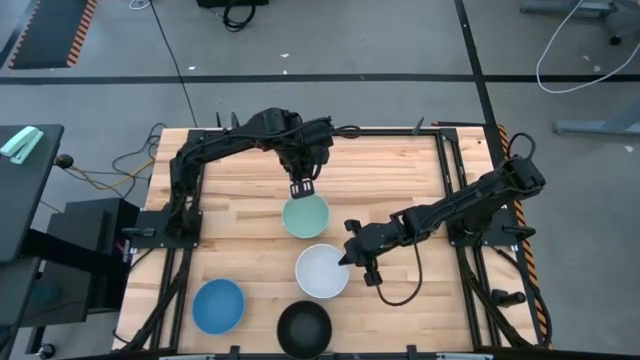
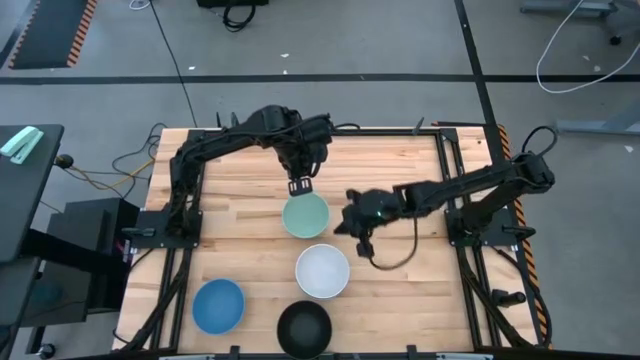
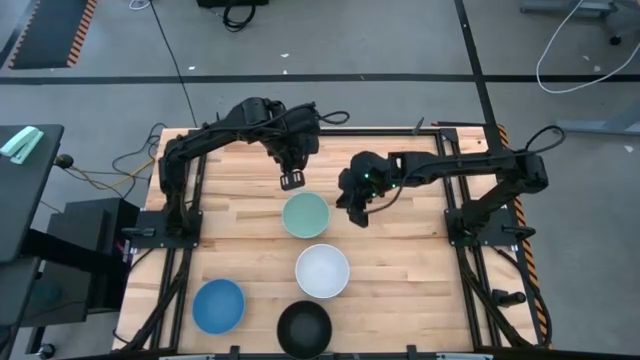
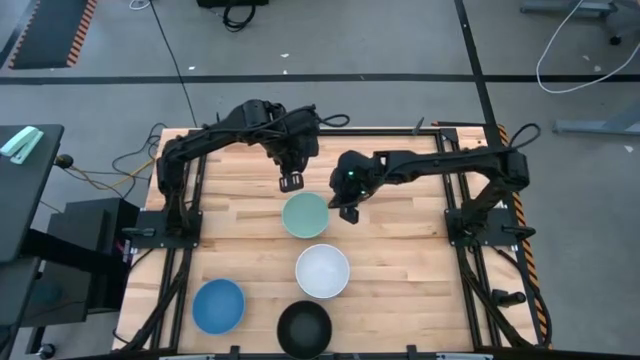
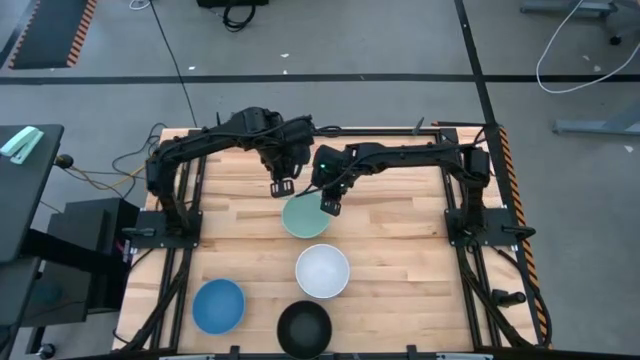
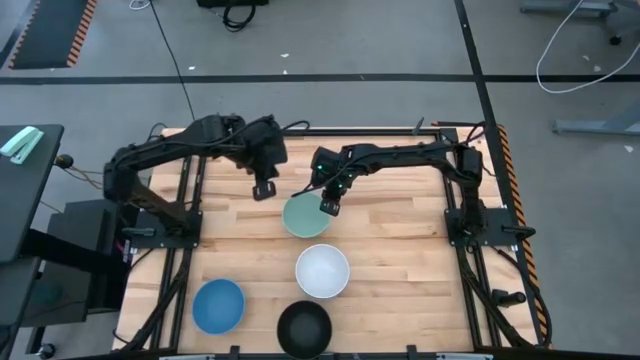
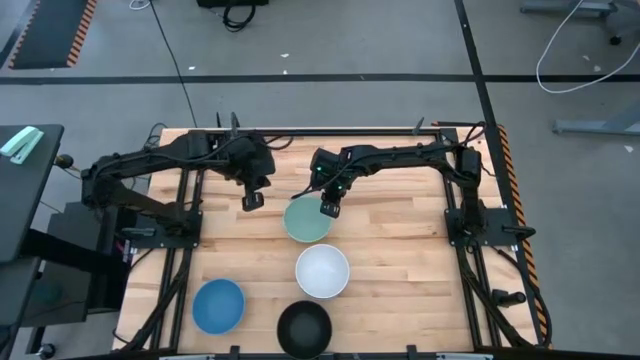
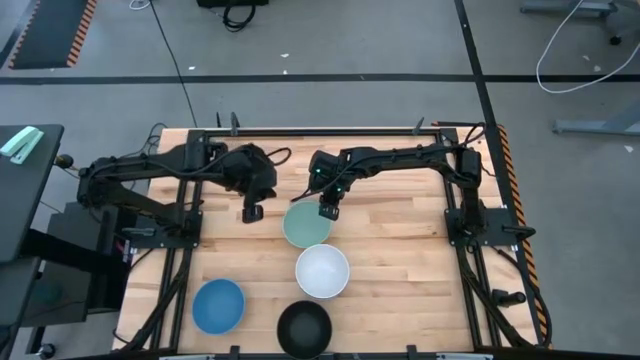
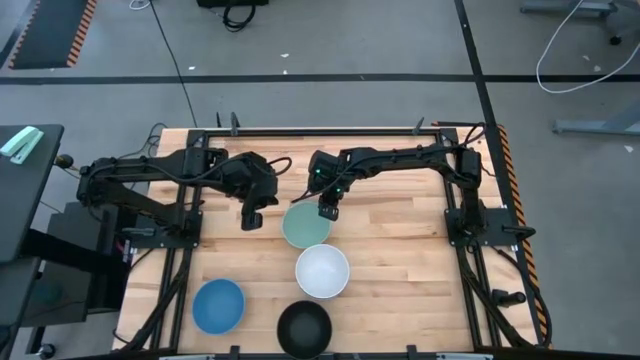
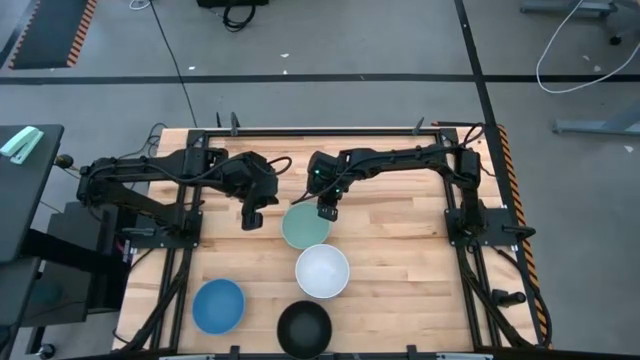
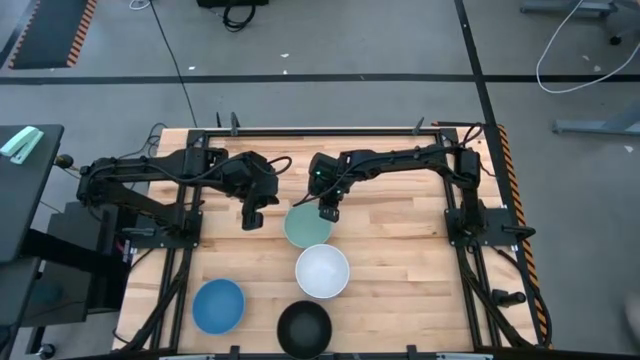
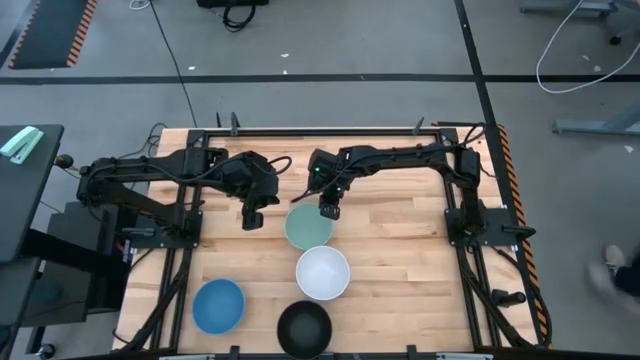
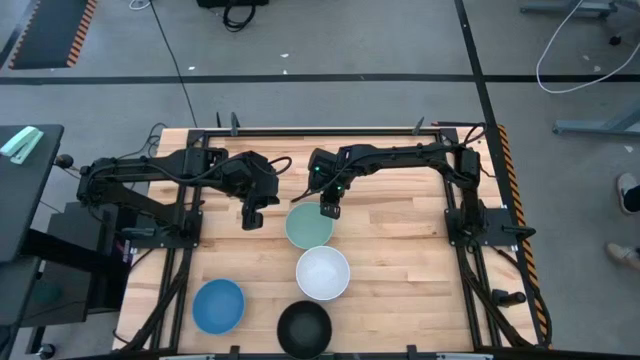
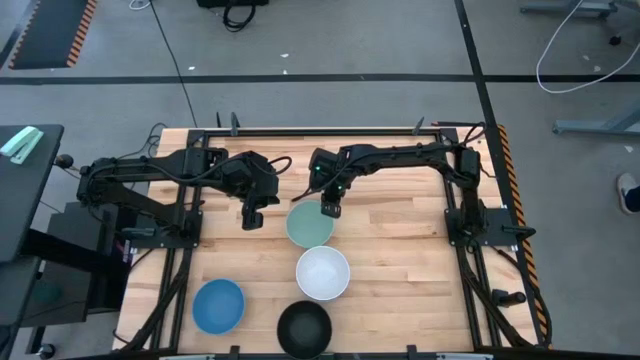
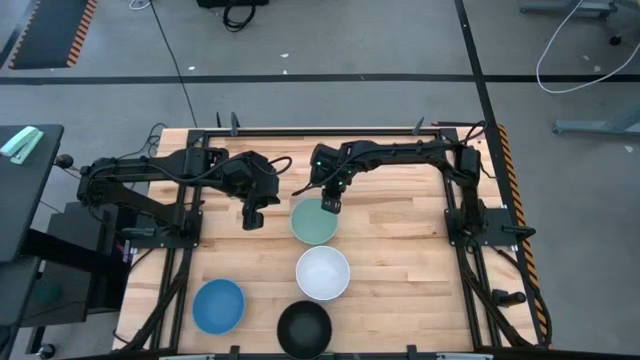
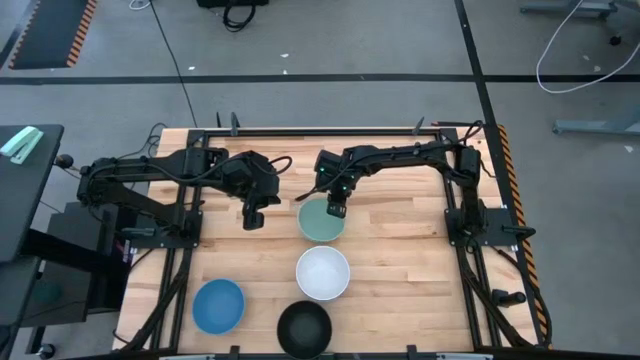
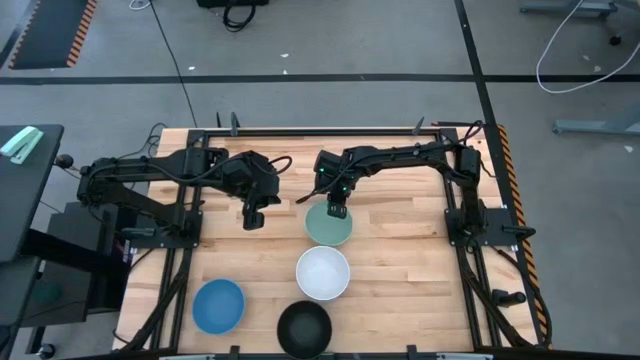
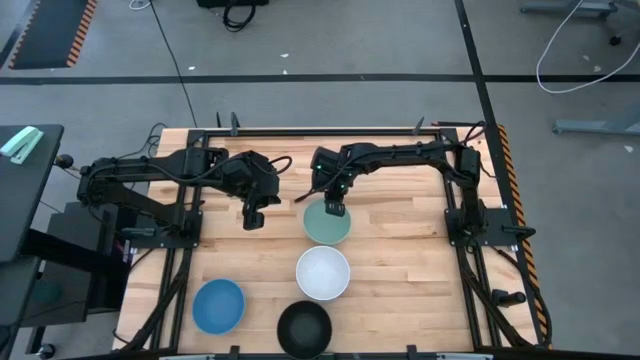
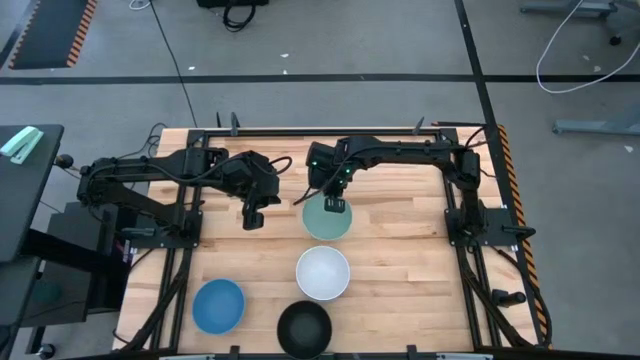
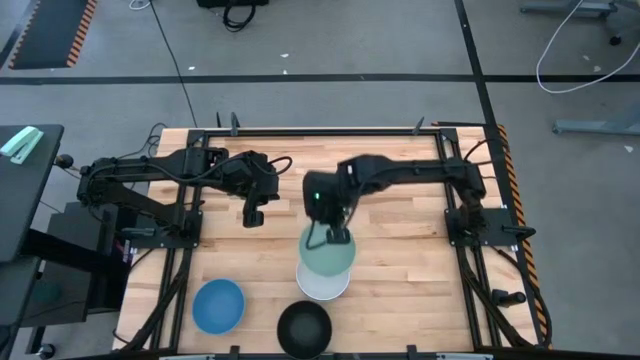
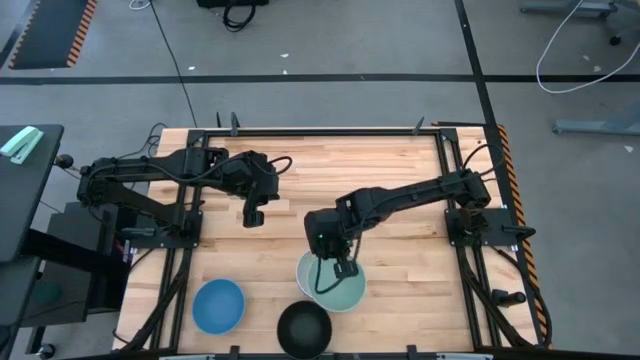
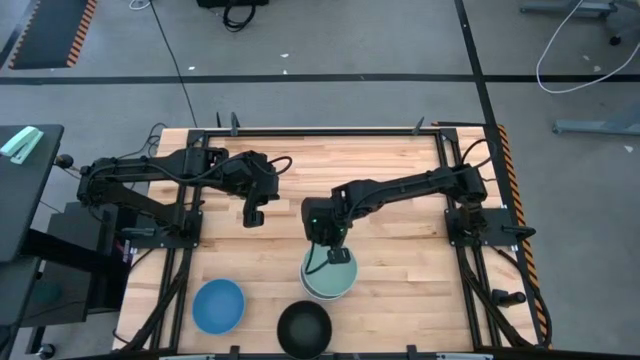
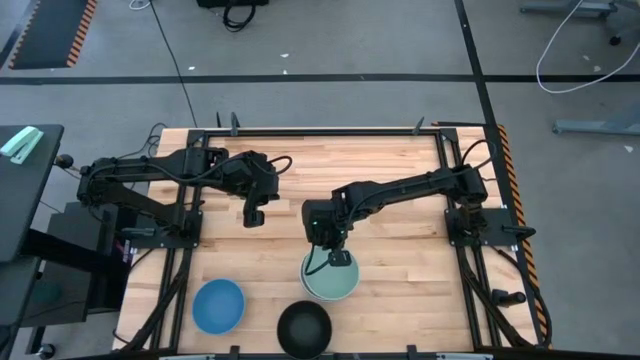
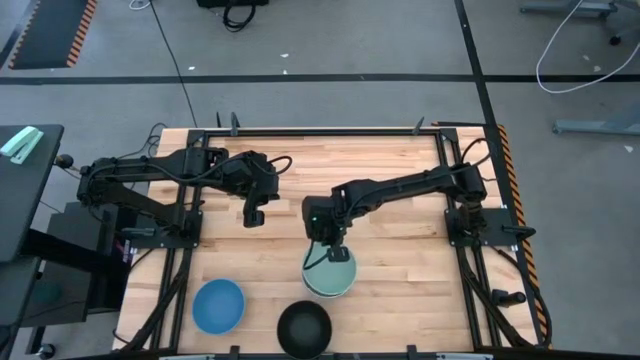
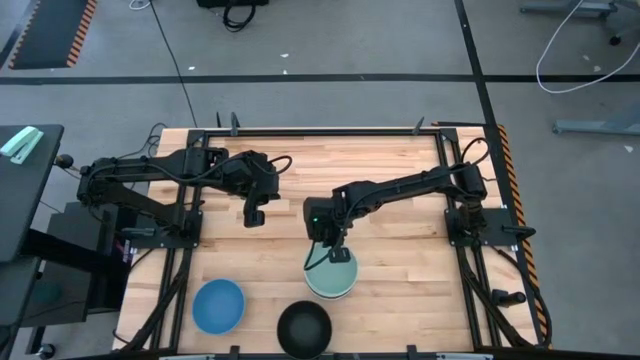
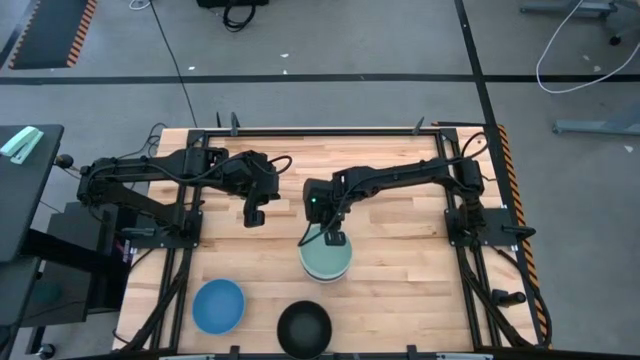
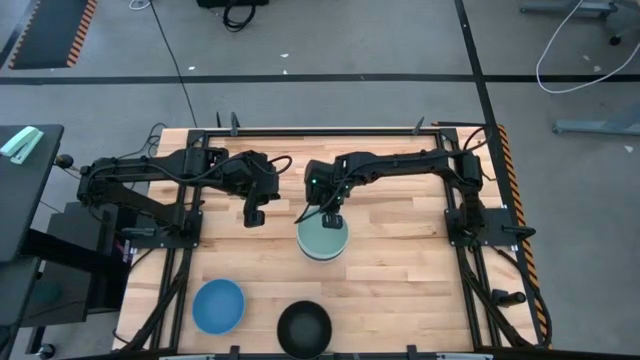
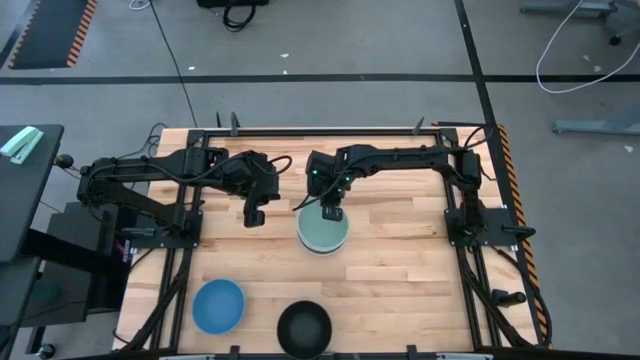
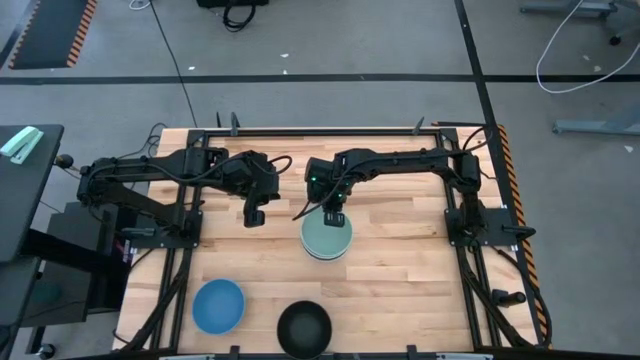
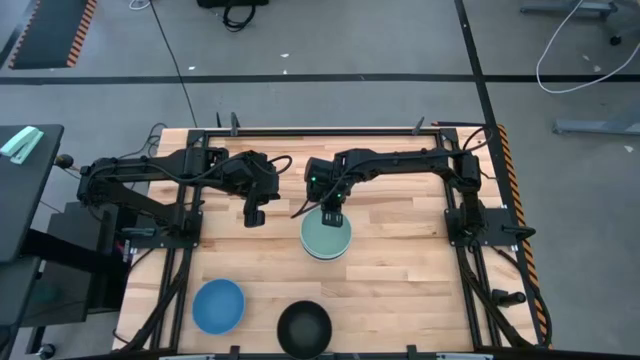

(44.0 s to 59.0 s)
Task: Nest bowls inside each other
Stack the green bowl on top of the white bowl

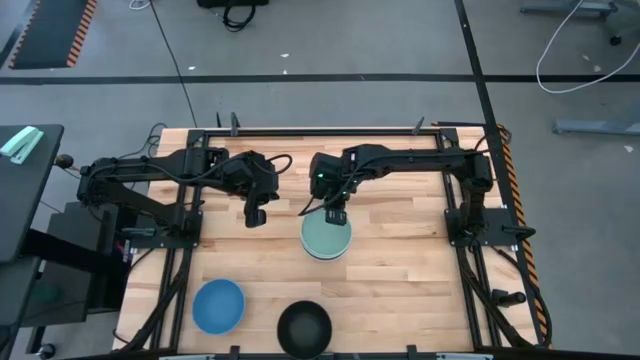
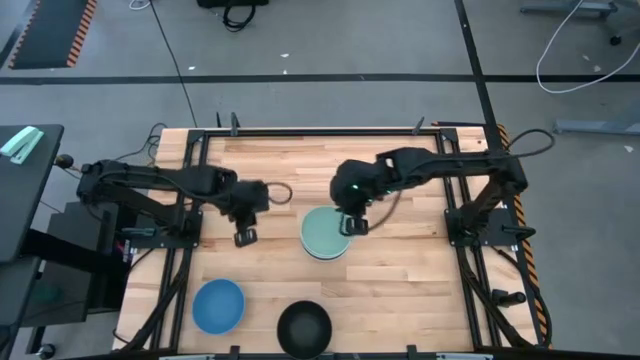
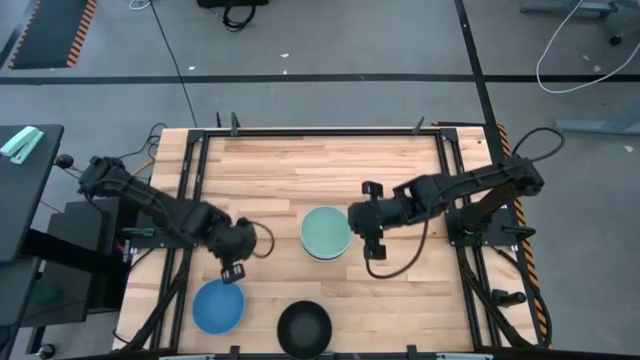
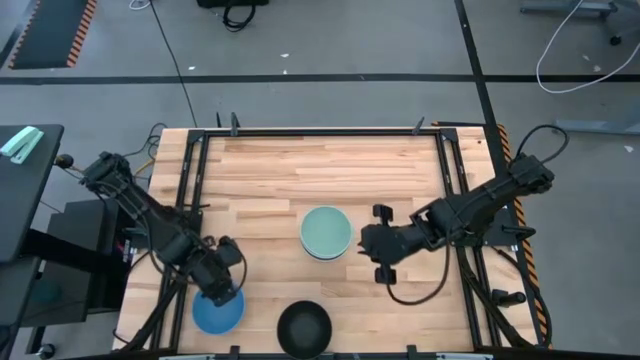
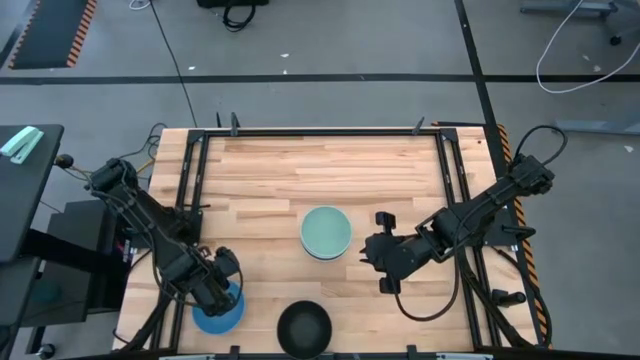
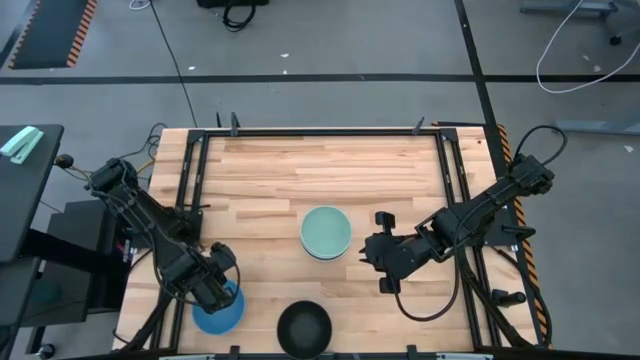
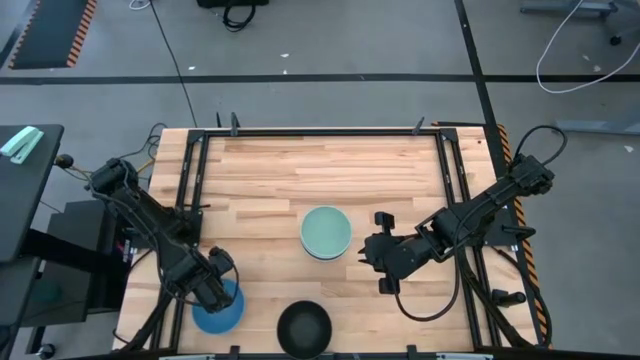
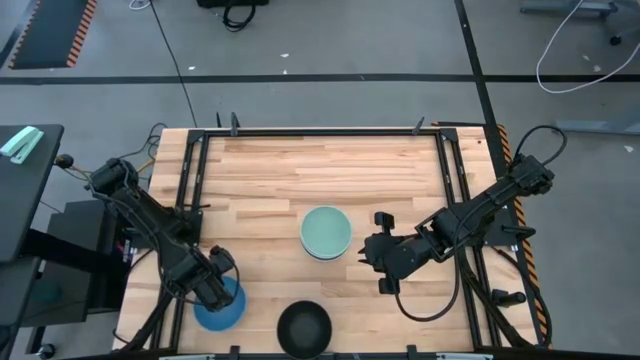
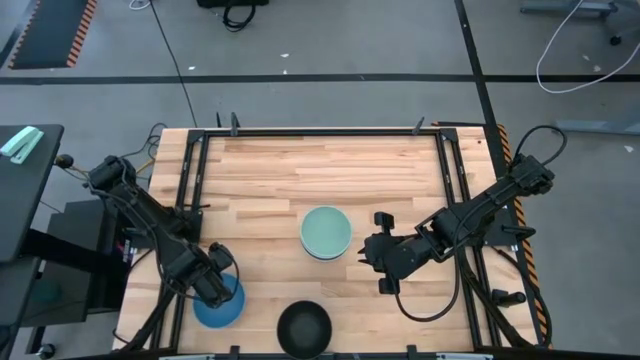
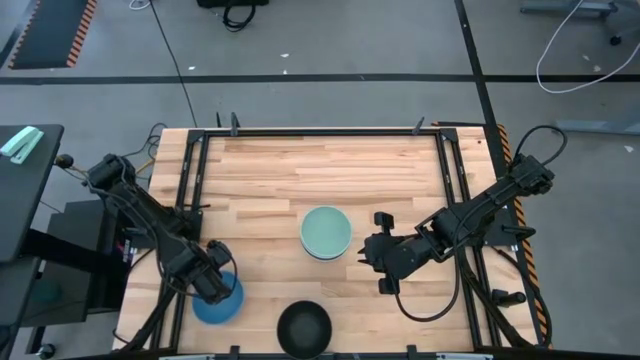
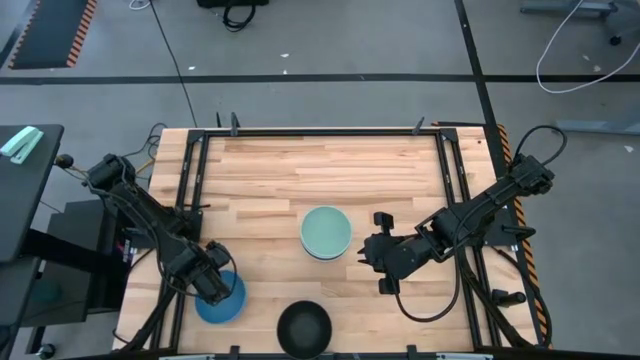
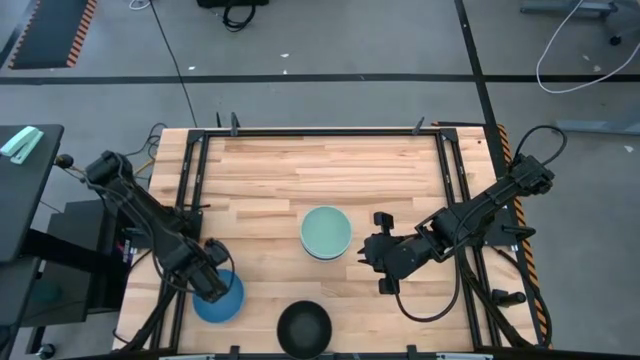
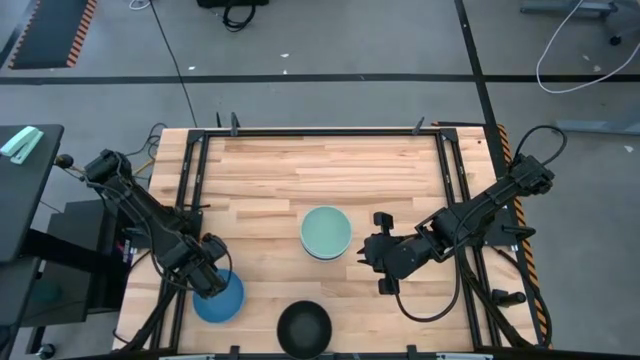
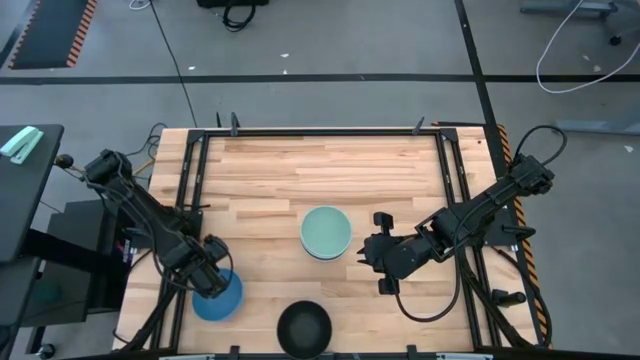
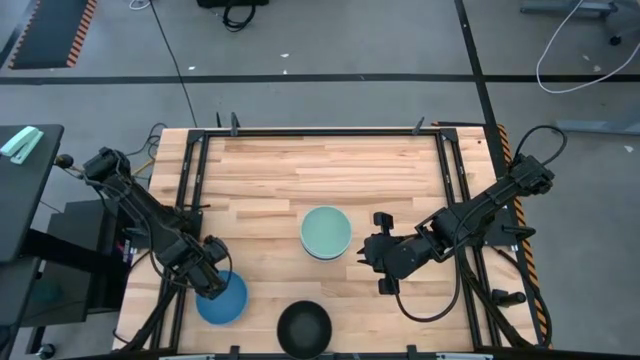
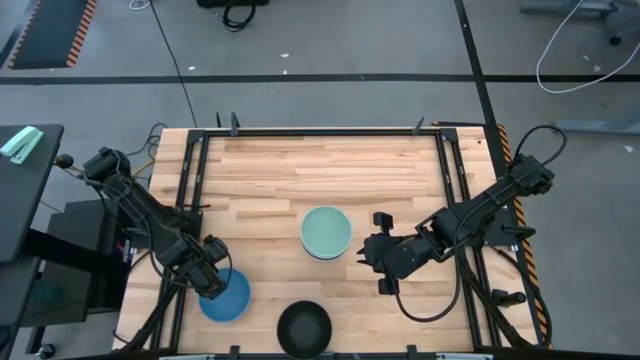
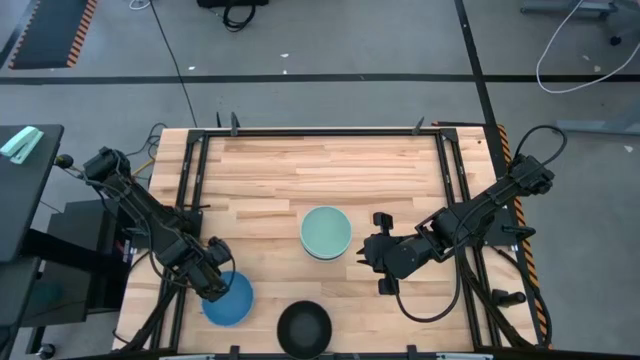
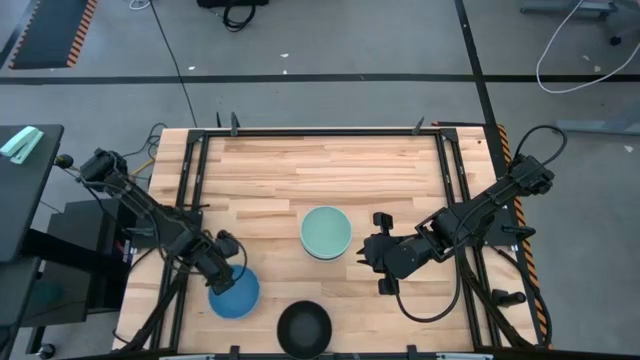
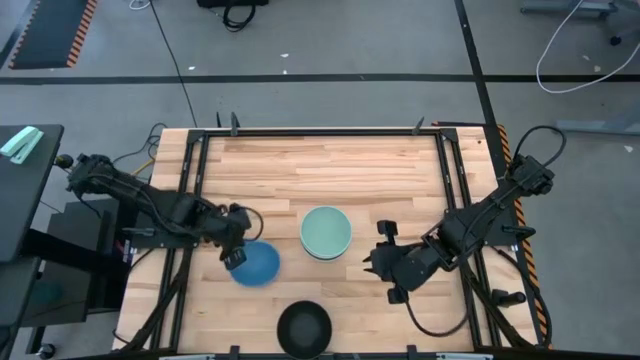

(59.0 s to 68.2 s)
Stack the blue bowl on top of the green bowl
